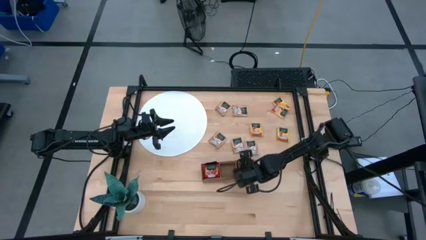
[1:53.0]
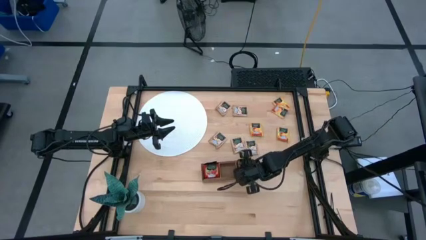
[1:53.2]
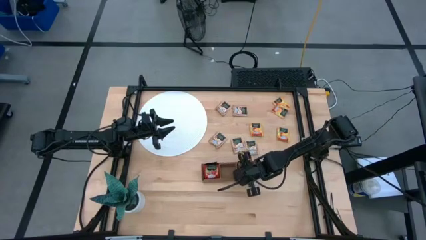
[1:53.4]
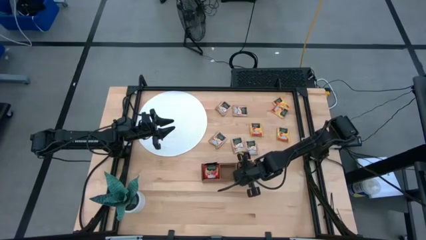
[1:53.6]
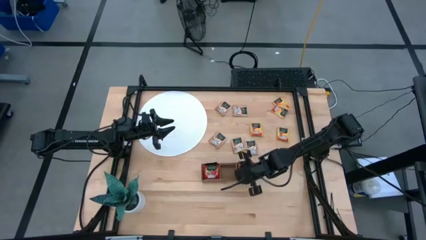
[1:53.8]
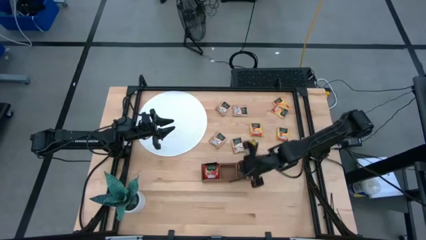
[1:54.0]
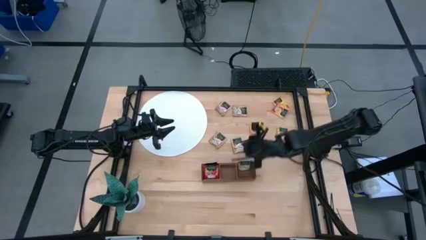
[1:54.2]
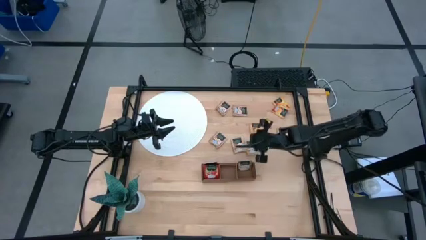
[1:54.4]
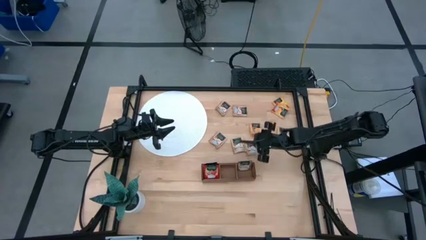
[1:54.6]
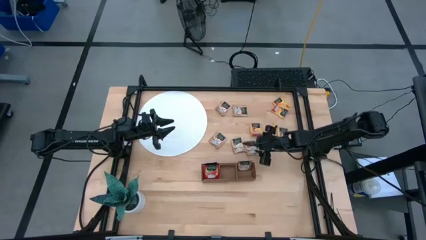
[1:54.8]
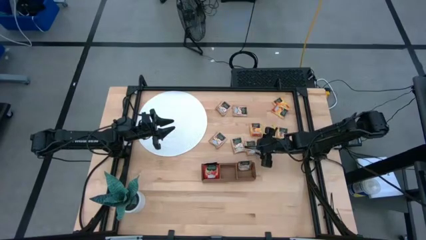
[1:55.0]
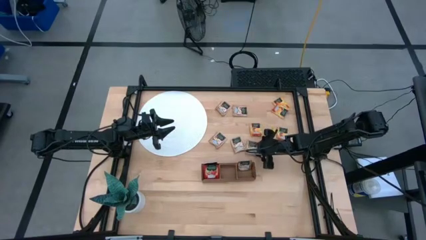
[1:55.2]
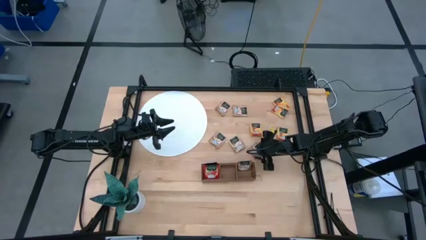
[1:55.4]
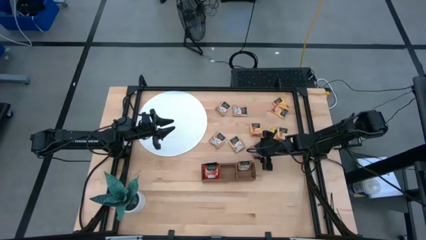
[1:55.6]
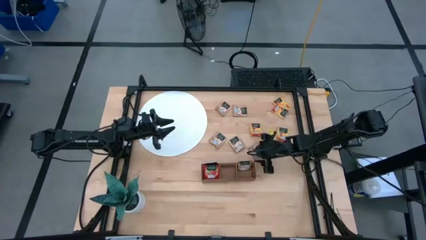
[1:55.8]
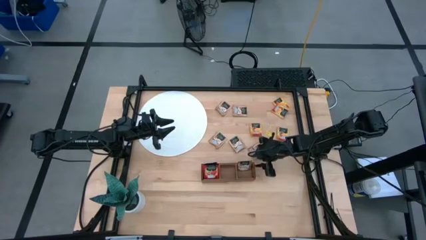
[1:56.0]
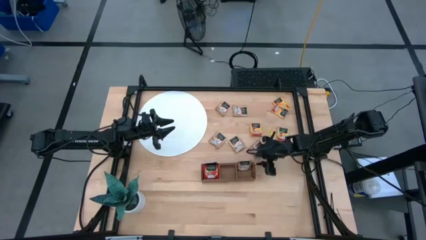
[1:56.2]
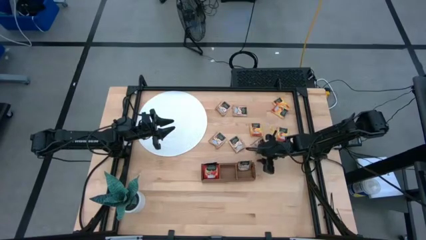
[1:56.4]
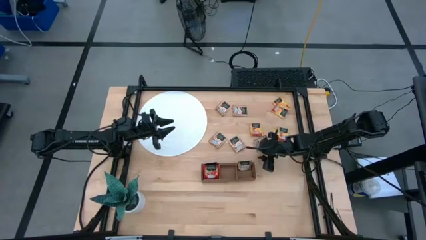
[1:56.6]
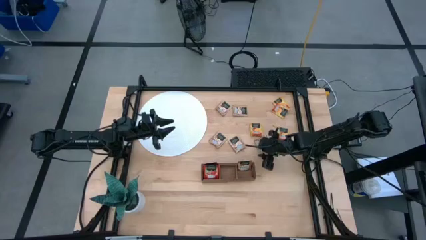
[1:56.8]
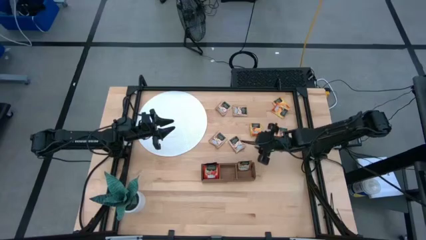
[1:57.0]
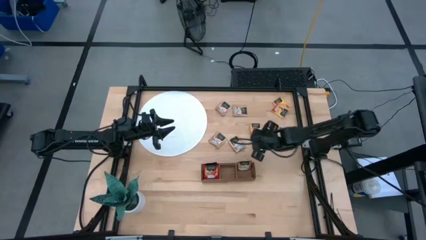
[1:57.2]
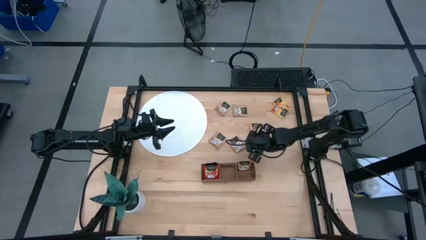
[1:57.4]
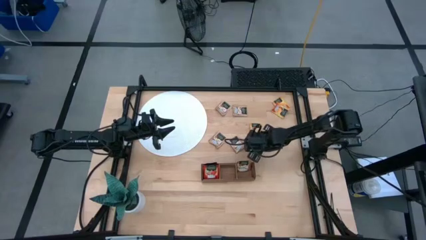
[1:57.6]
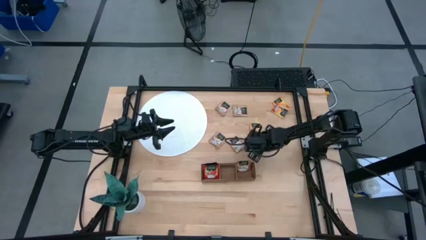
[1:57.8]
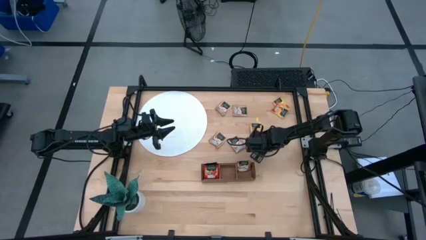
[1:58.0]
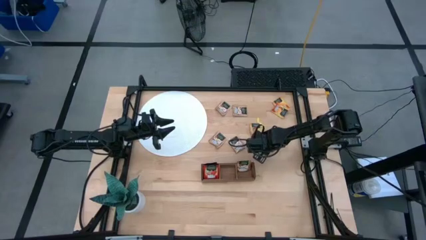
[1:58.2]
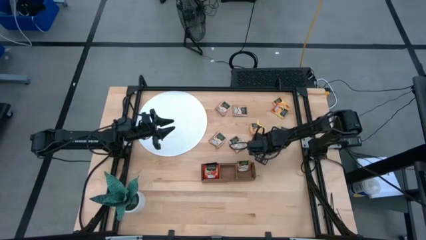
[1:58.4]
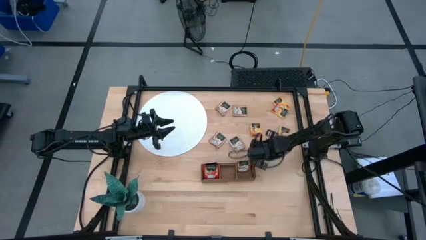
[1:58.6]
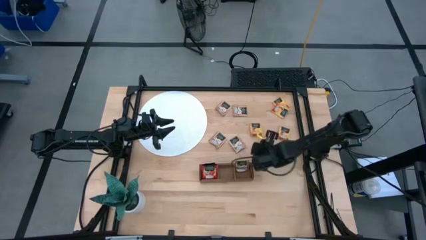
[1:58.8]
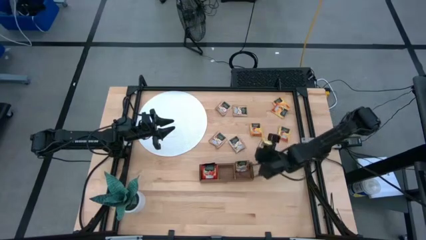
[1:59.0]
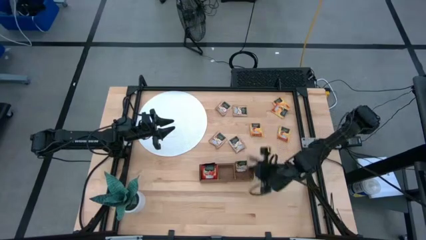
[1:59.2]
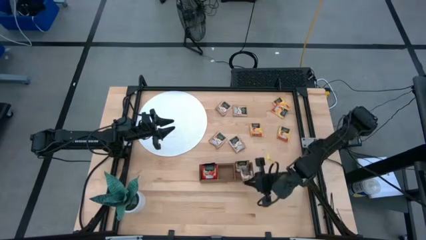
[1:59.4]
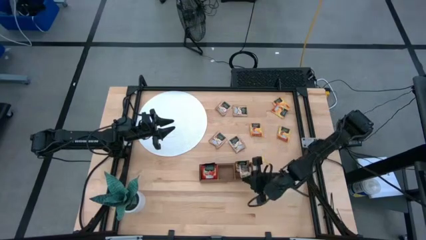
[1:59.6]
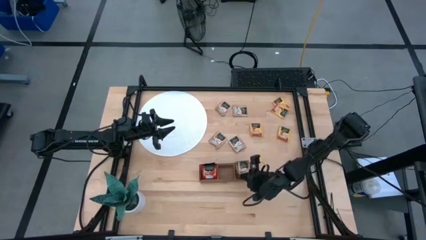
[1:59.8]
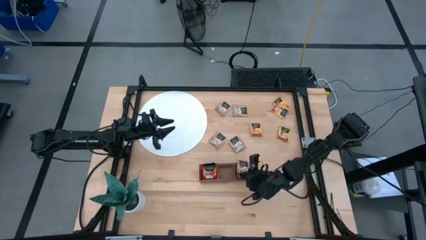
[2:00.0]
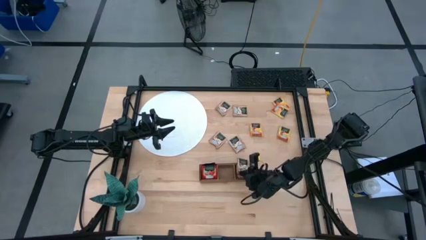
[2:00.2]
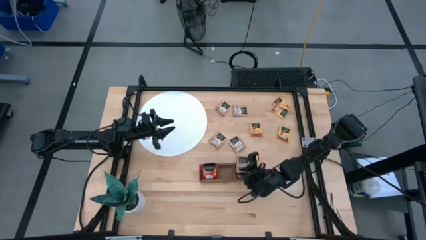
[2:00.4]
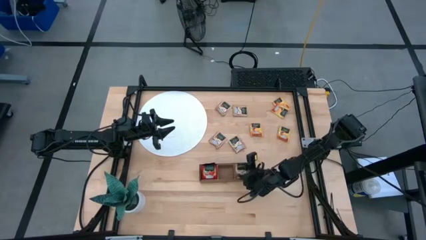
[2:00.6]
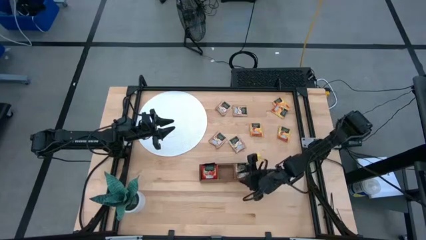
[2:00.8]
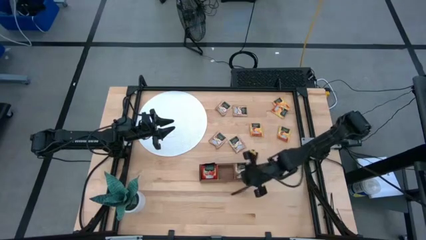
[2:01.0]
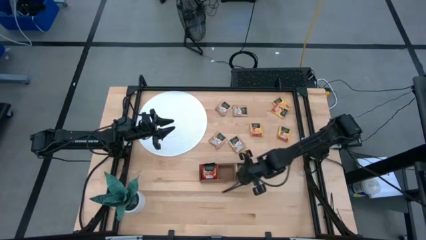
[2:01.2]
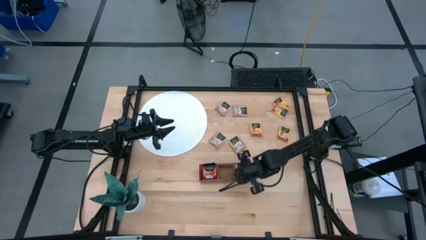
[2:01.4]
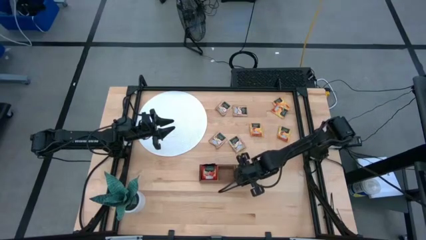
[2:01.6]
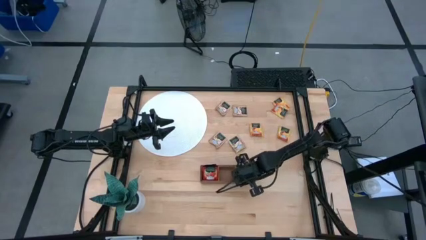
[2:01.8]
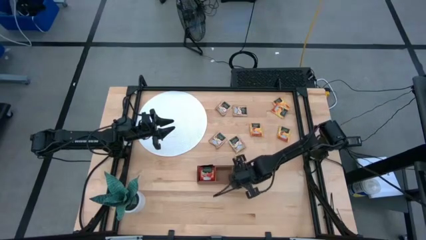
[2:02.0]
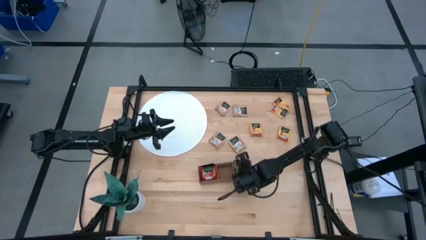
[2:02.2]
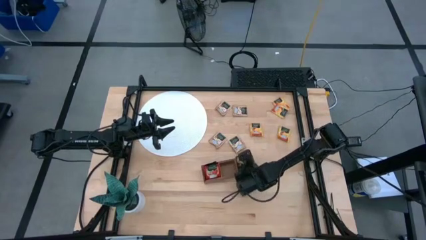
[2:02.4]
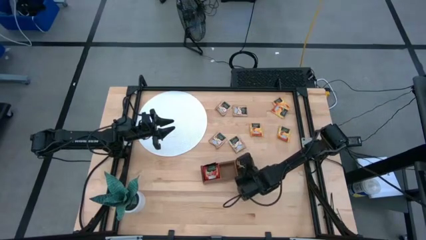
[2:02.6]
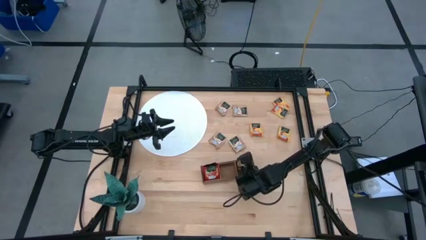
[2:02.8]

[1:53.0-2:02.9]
Task: Pick & Place Tea
Put the brown tea bag into the right section of the wooden organizer

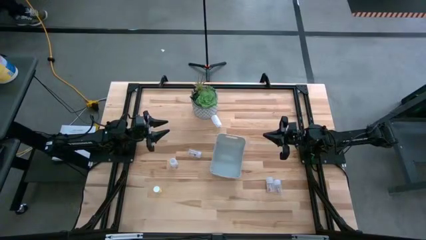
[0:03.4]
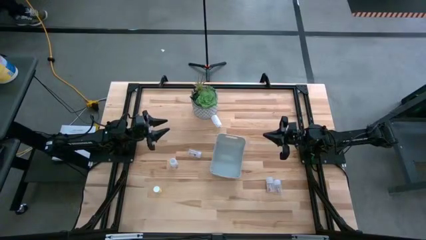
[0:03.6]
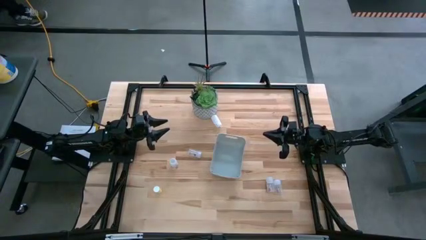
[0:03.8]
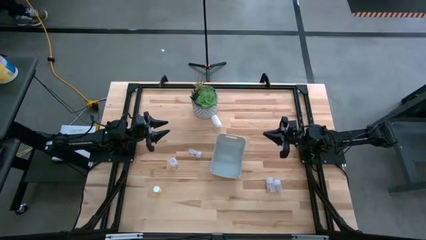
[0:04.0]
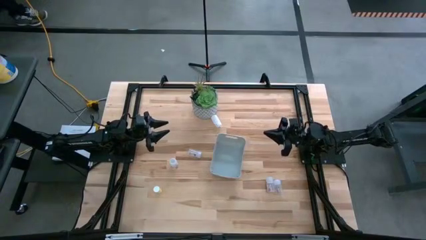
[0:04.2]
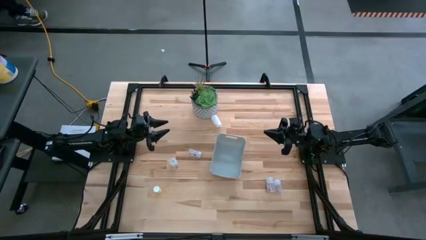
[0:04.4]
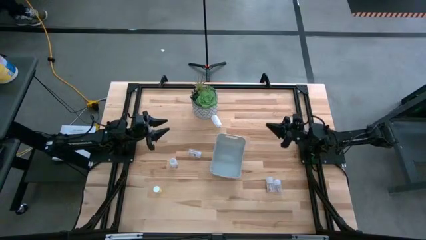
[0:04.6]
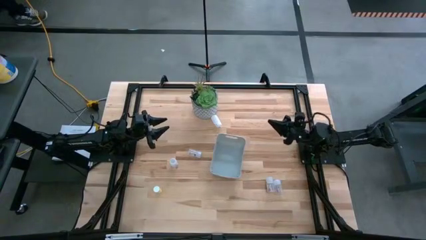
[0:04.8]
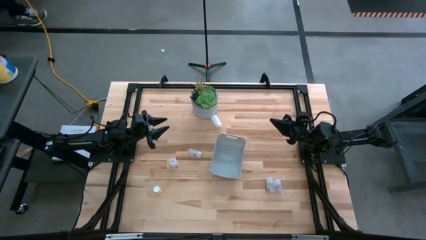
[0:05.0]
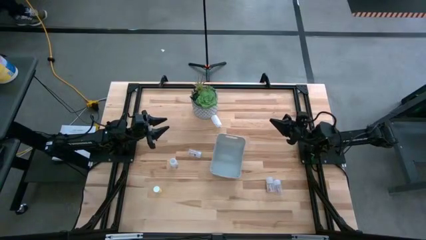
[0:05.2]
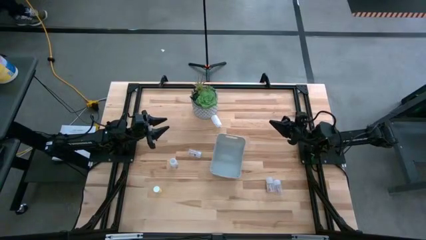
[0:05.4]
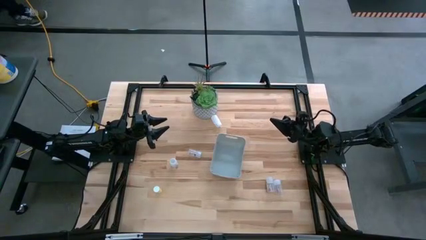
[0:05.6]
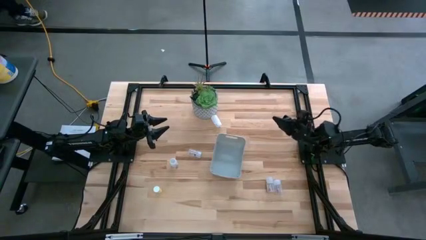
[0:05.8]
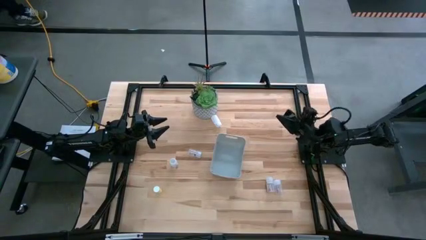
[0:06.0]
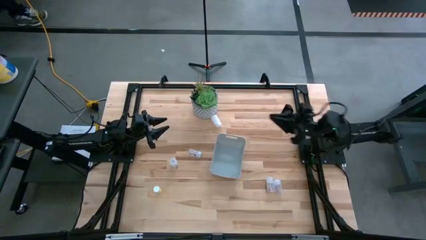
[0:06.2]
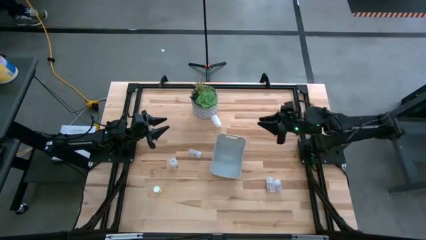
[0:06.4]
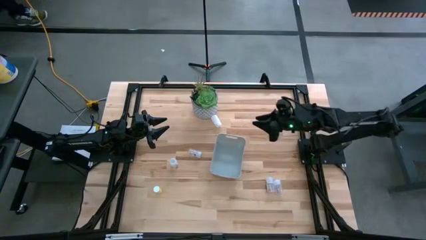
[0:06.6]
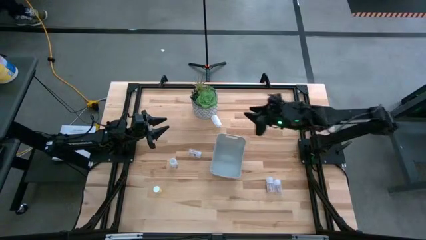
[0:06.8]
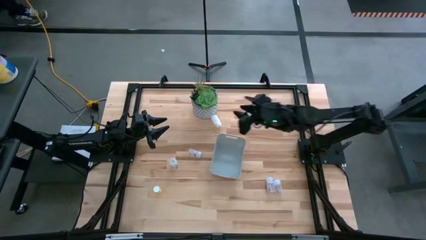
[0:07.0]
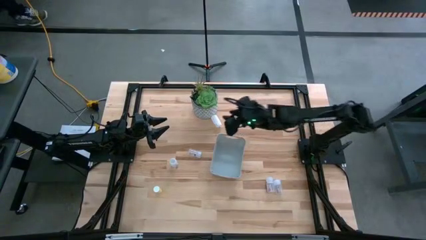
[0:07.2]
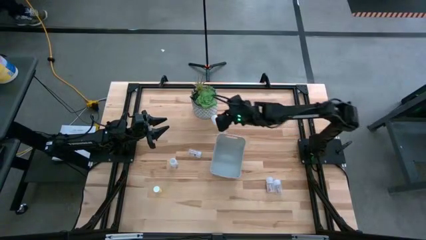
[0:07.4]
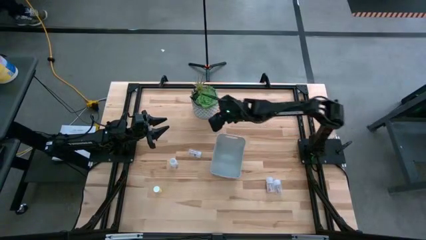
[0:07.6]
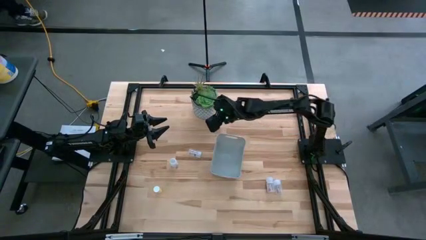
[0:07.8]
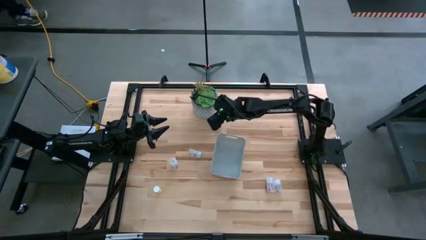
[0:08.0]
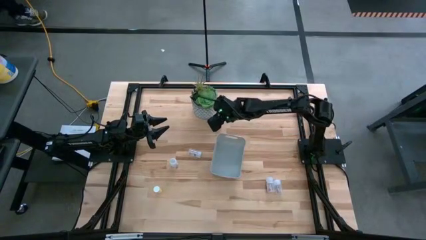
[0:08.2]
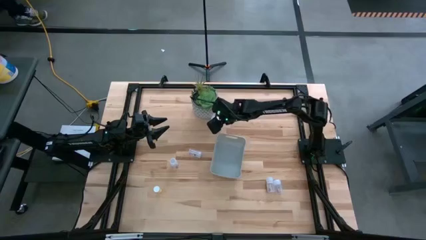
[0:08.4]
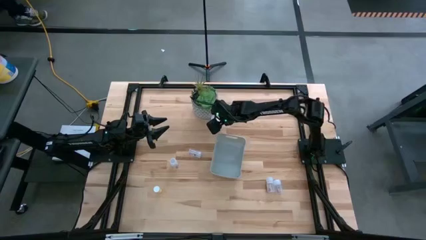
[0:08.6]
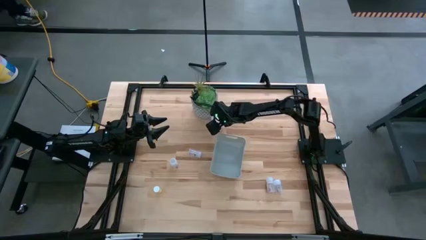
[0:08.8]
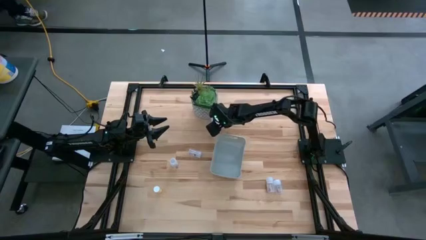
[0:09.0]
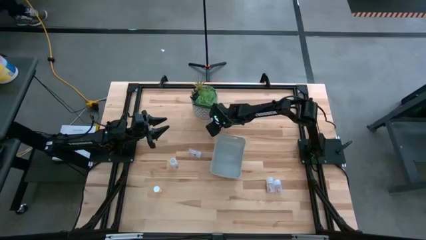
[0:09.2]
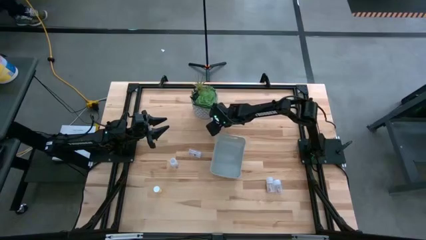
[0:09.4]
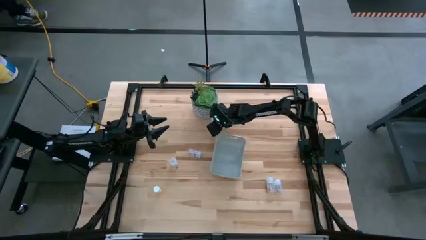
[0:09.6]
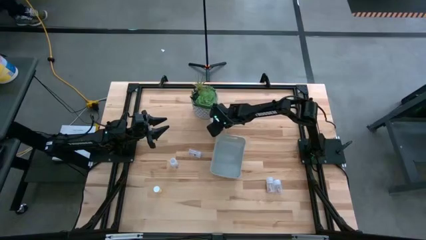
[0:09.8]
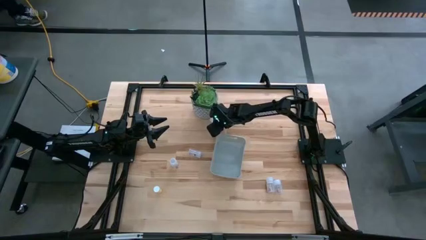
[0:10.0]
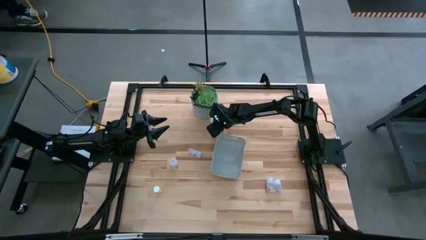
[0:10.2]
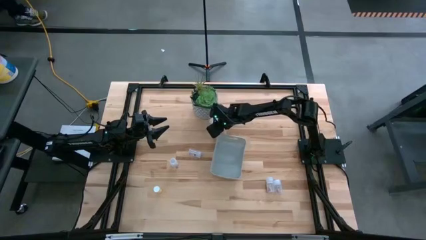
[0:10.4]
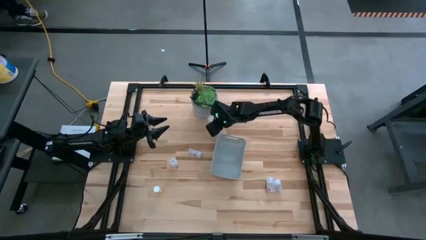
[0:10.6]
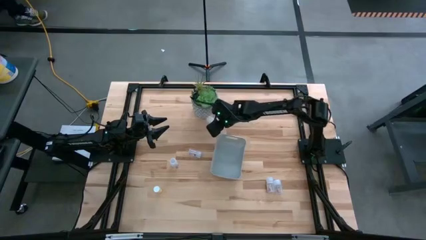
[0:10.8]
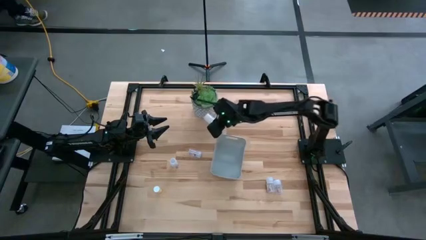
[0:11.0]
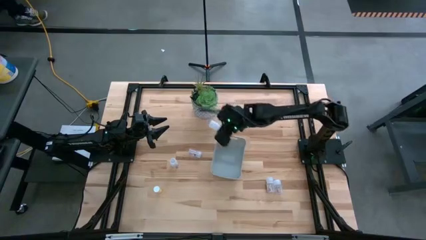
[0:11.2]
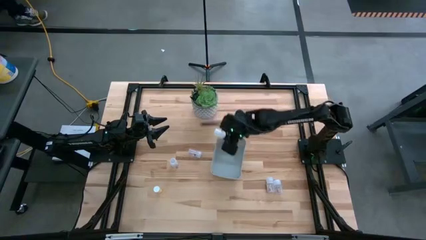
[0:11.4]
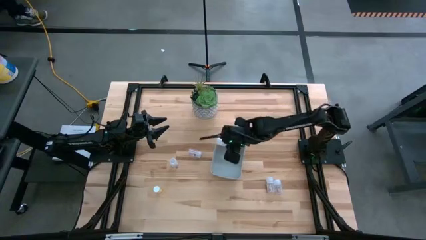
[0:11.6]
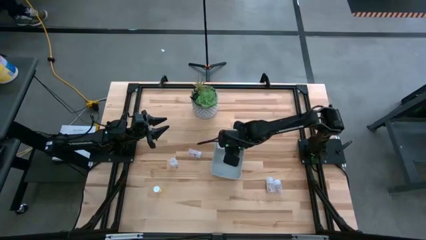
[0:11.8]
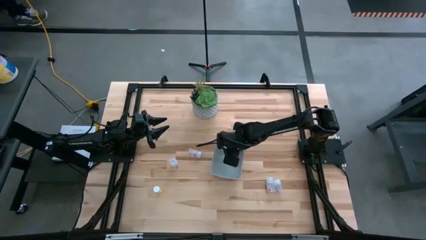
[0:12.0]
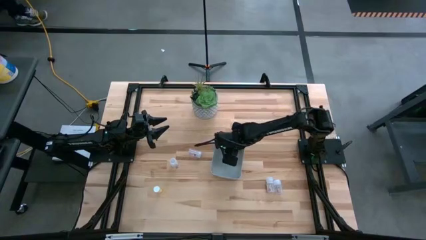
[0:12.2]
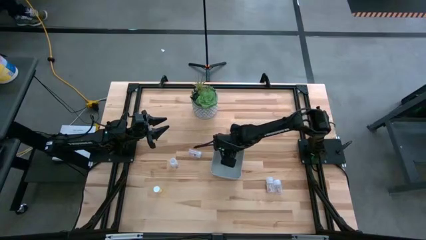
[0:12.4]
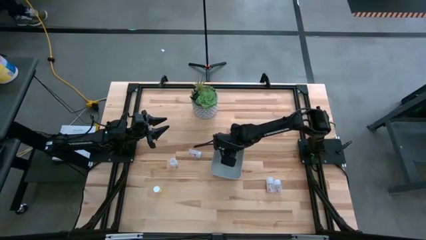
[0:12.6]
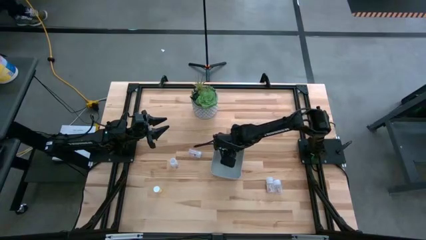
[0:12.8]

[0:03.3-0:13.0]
Task: Pick and place pill bottles into a basket
Put the white medicine bottle into the white bin
